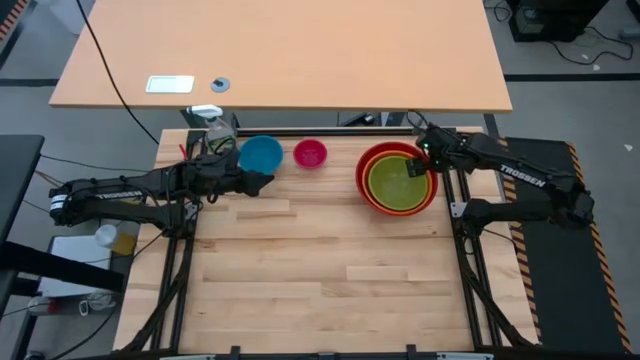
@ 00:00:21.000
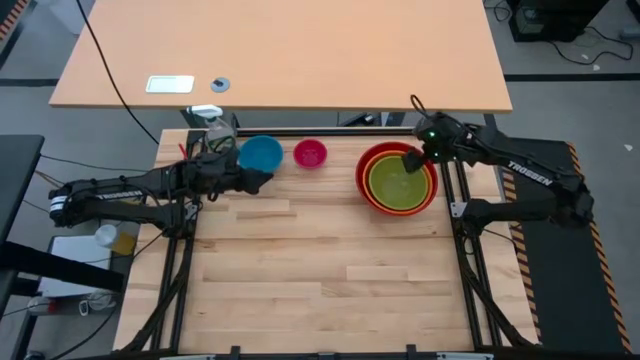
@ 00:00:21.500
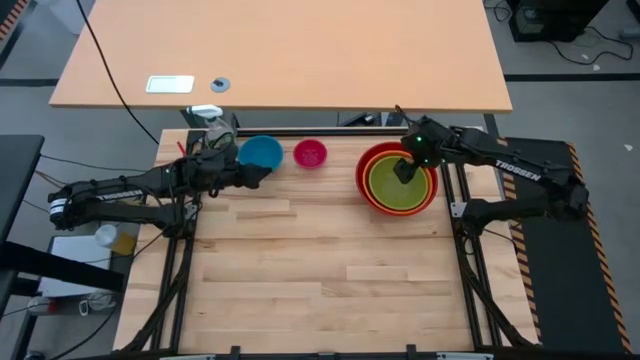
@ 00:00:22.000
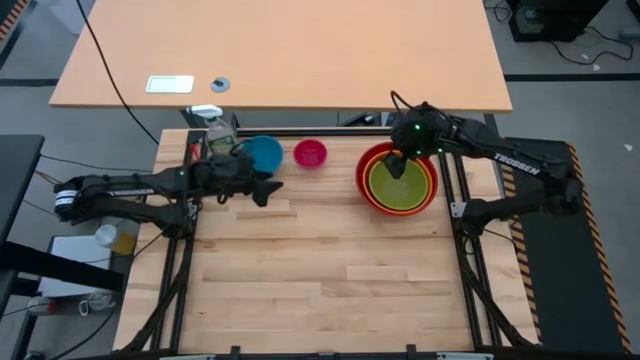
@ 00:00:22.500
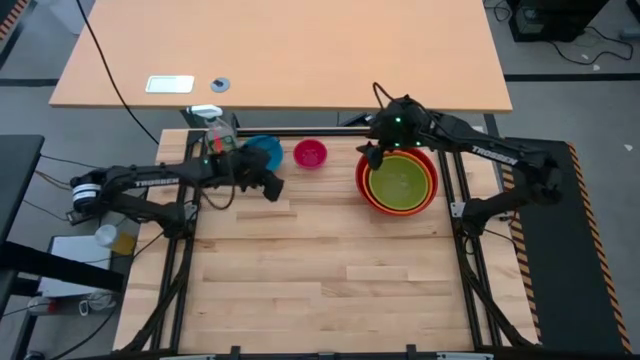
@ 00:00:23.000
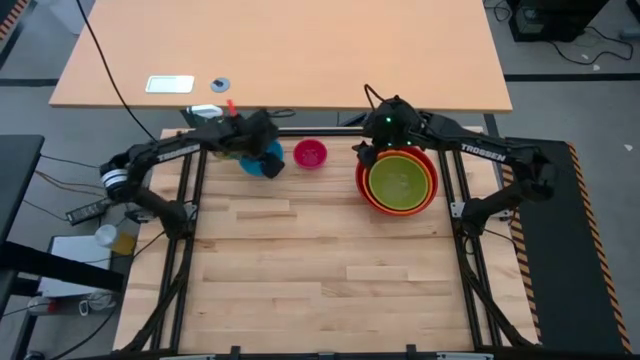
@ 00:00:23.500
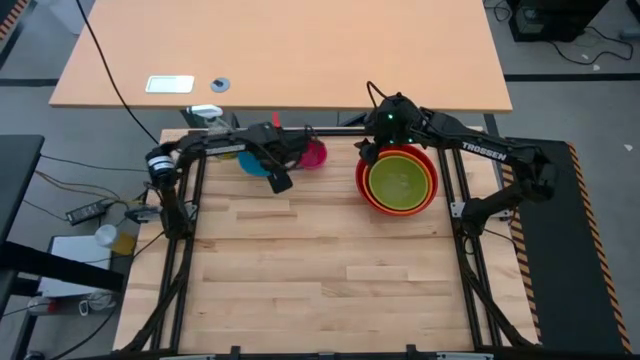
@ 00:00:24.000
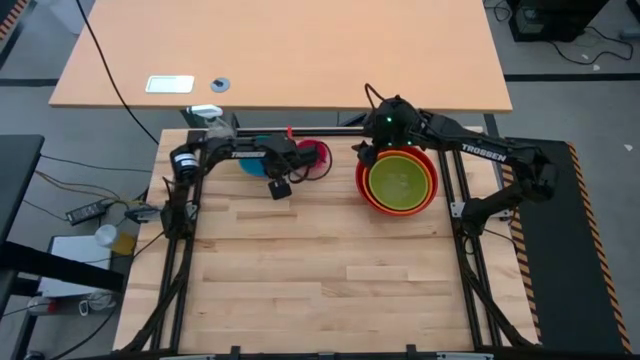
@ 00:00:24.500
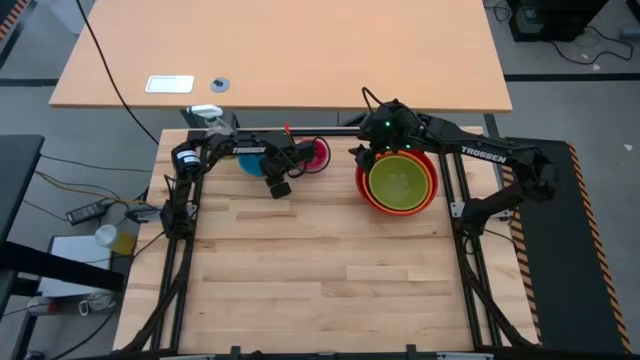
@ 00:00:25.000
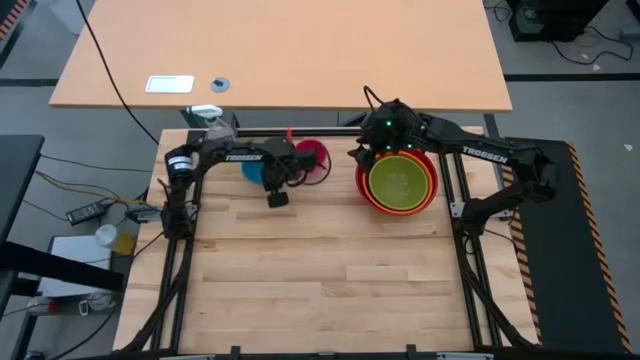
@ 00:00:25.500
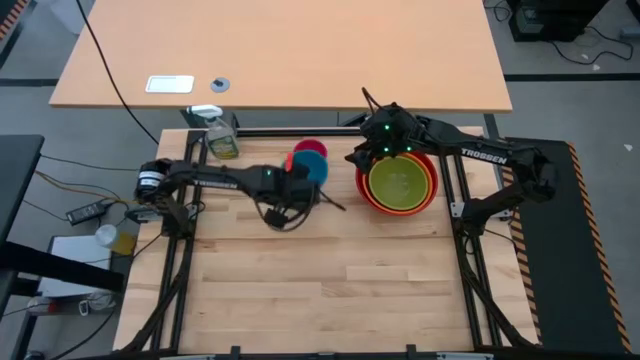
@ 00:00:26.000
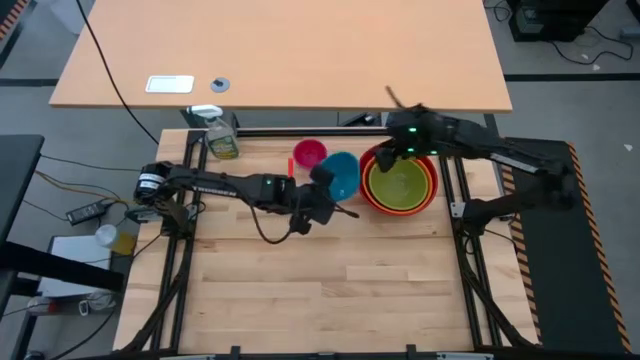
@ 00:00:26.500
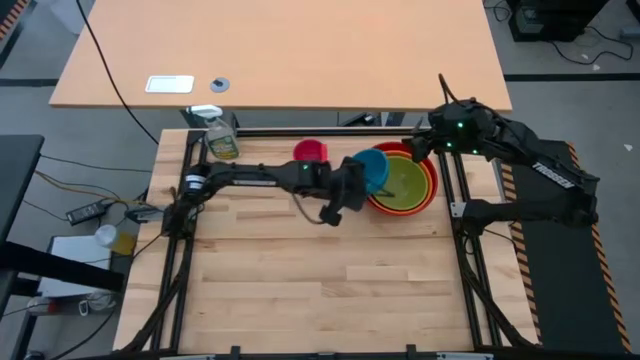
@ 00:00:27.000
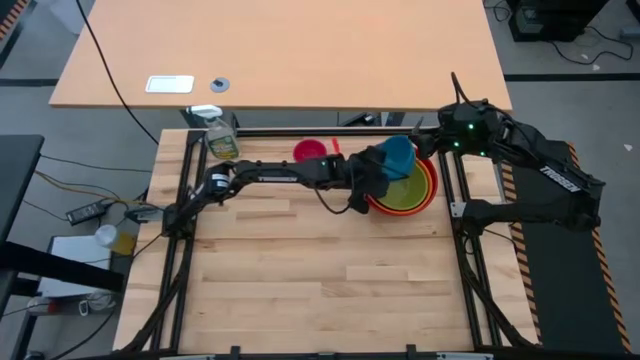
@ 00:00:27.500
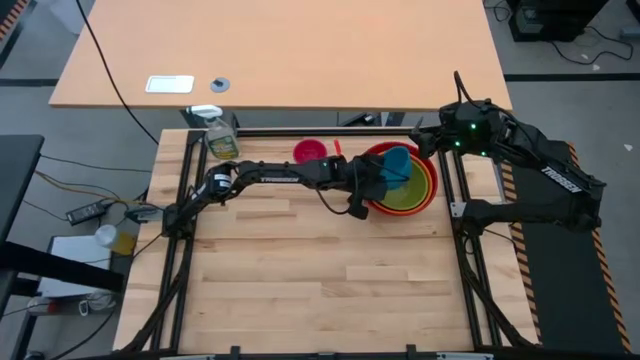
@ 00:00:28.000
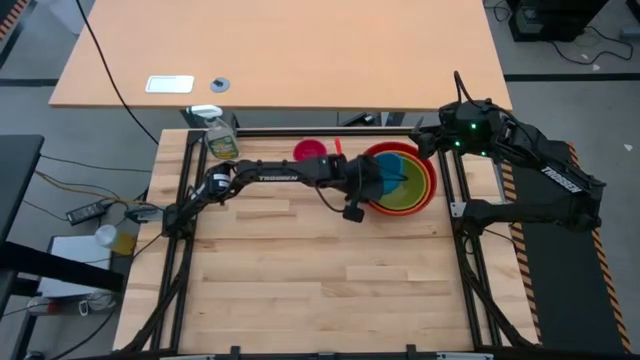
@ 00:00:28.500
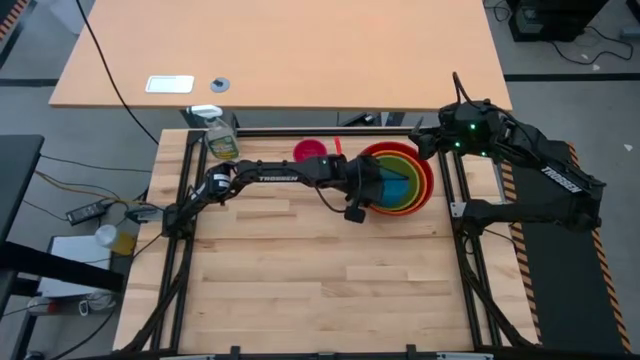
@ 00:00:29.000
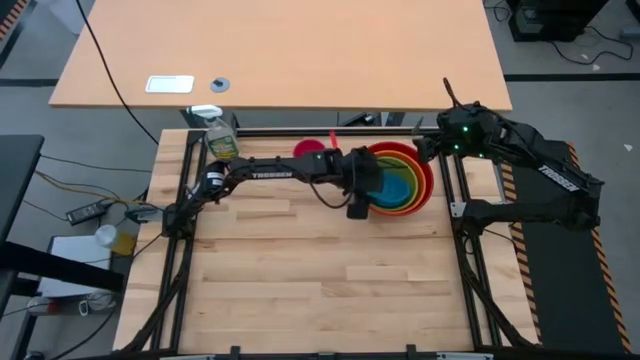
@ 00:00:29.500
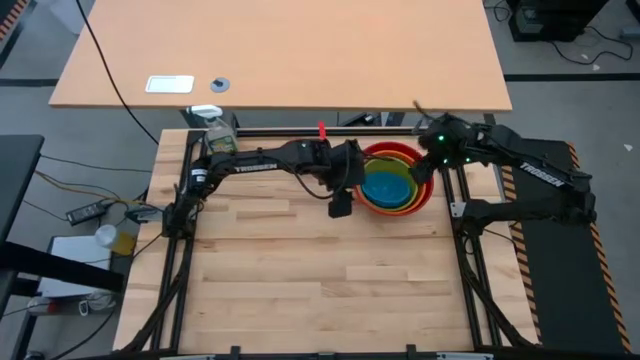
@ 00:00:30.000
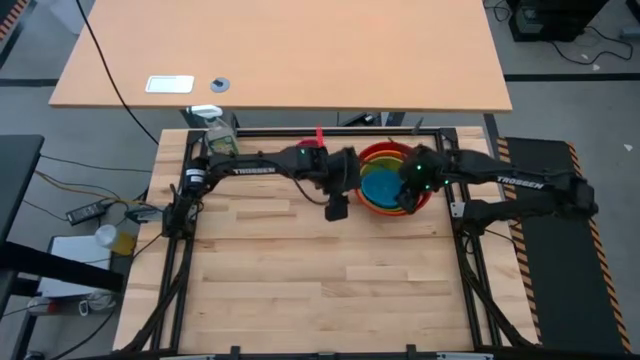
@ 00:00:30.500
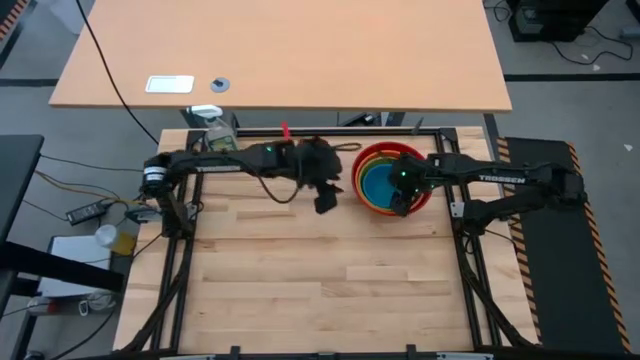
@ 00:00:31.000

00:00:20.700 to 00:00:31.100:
Stack the blue bowl on top of the green bowl

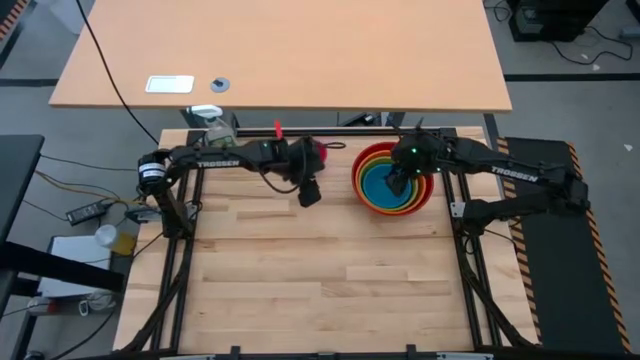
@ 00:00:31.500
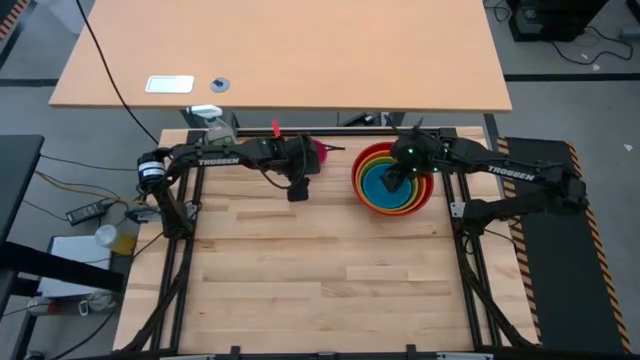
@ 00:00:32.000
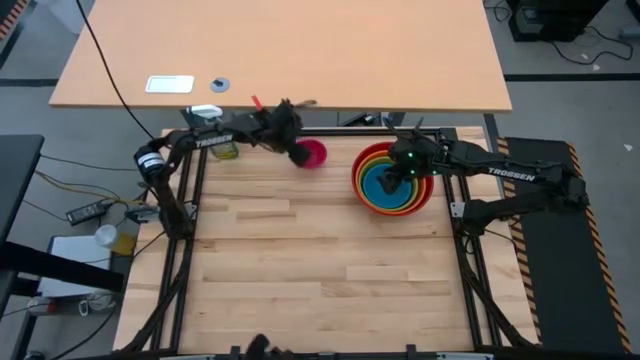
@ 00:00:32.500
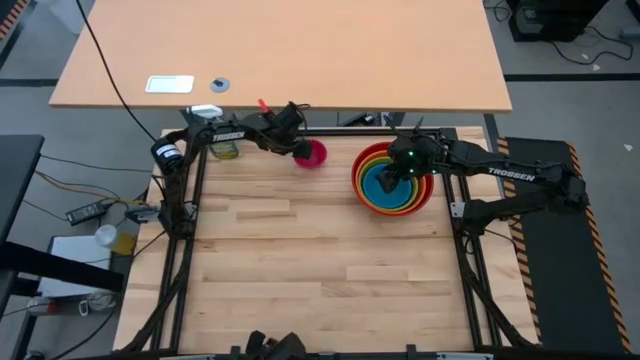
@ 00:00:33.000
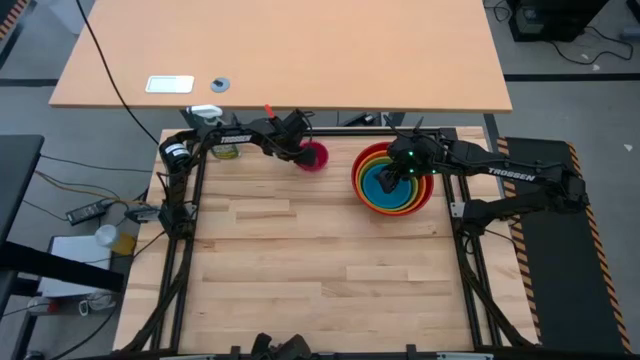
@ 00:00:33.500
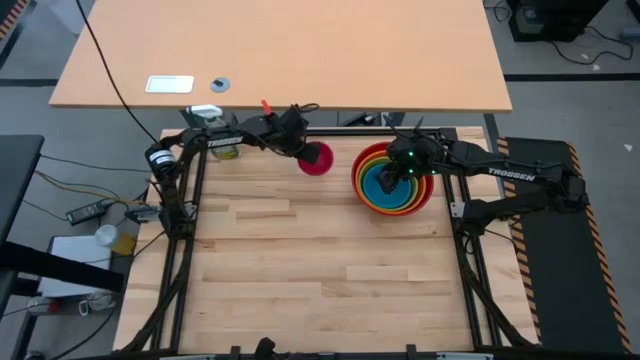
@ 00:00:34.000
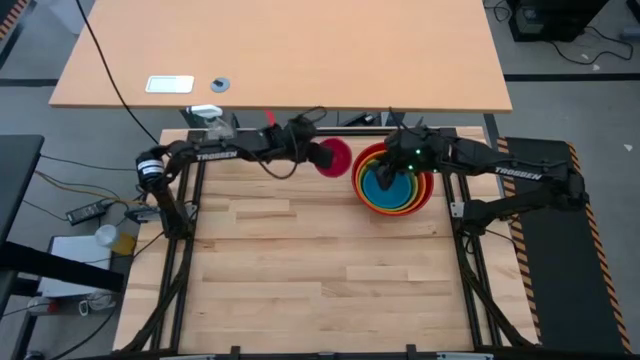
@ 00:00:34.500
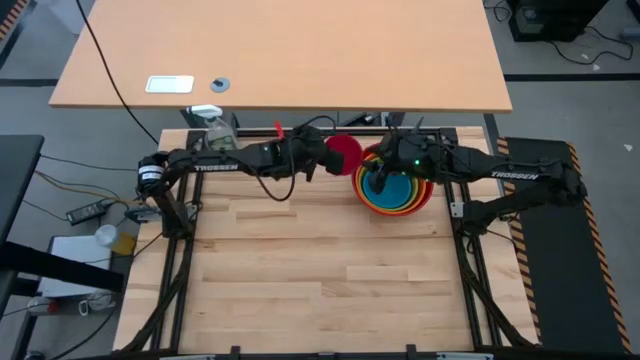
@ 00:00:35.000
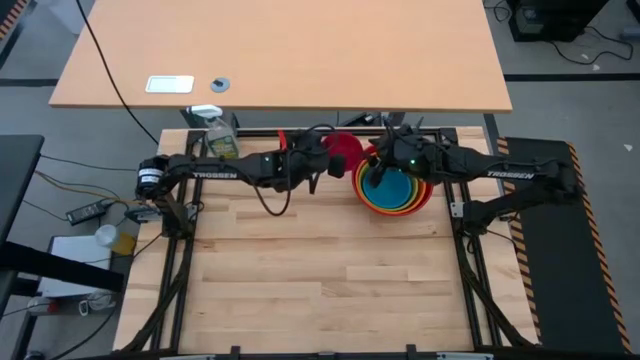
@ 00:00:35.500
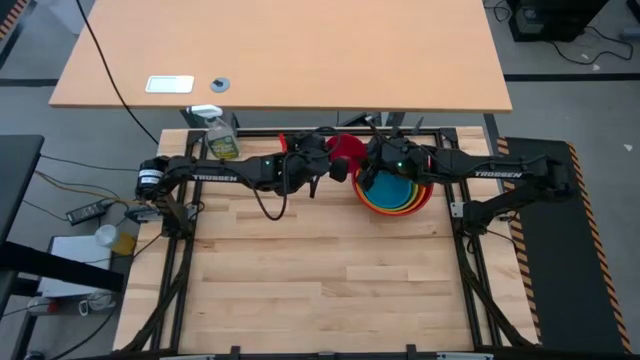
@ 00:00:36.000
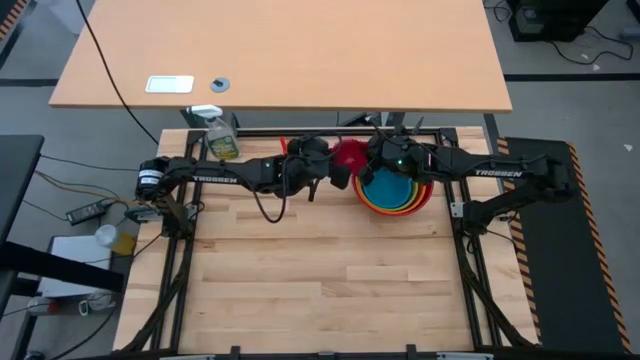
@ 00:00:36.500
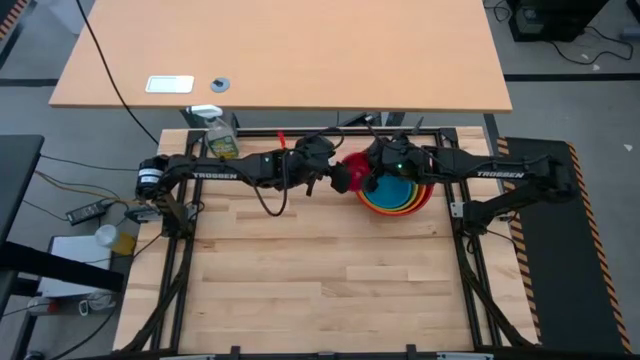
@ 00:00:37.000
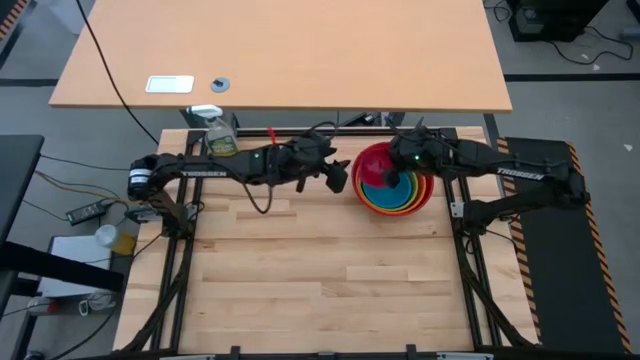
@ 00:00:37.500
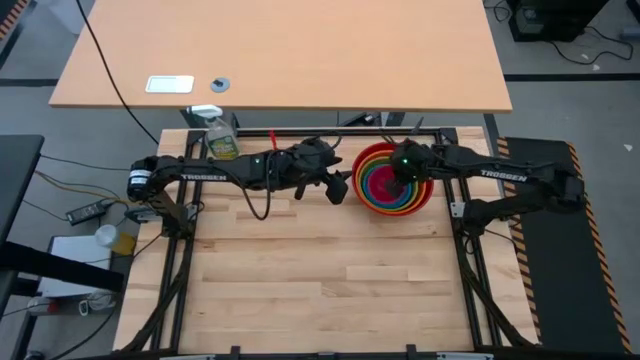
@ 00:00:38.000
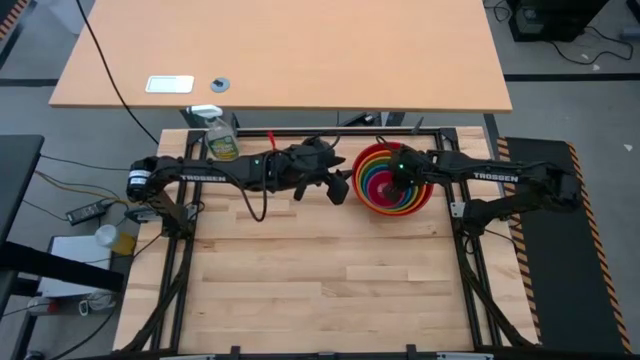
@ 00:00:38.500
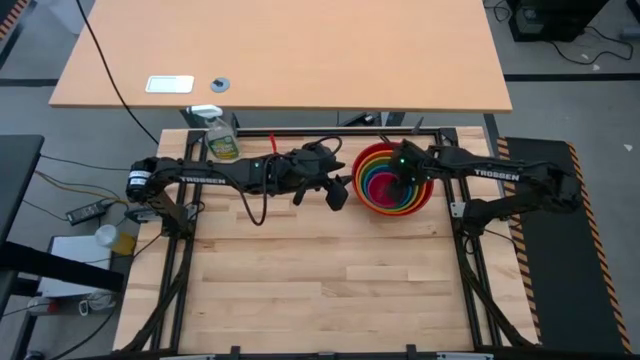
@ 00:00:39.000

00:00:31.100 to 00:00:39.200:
Stack the pink bowl on top of the blue bowl

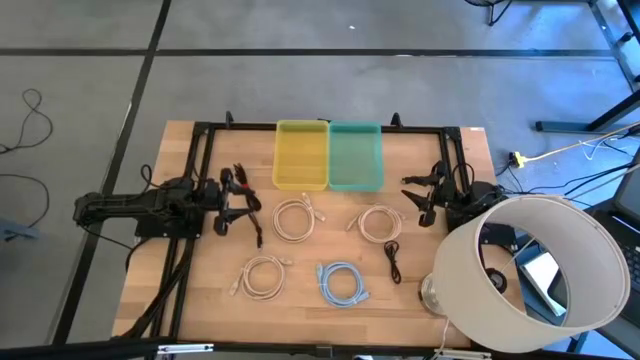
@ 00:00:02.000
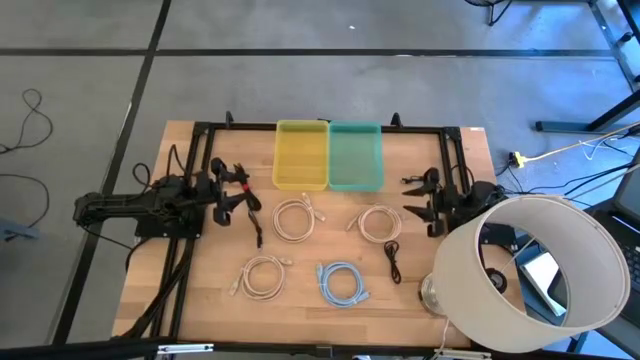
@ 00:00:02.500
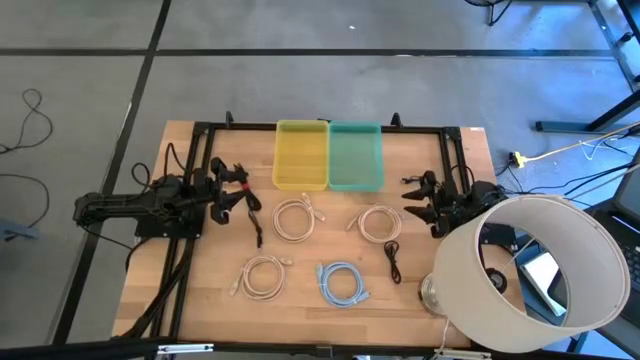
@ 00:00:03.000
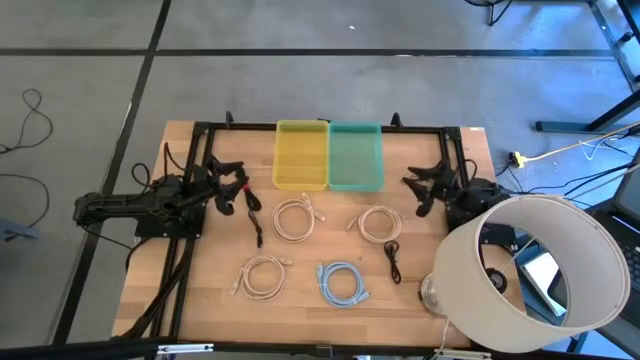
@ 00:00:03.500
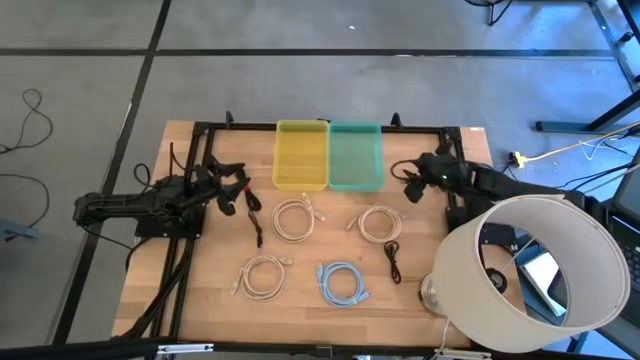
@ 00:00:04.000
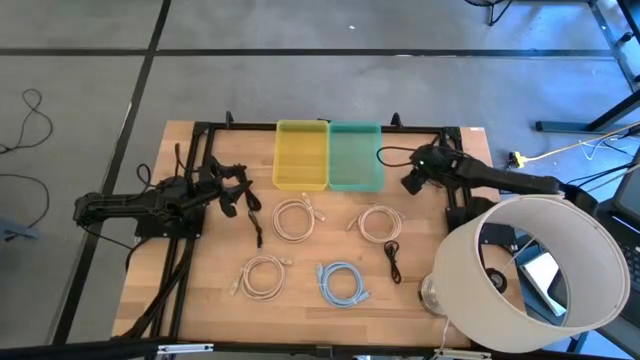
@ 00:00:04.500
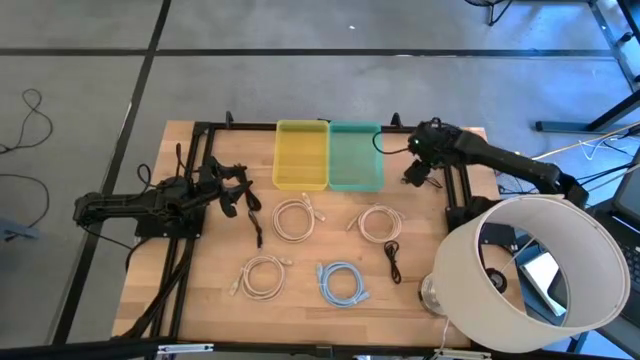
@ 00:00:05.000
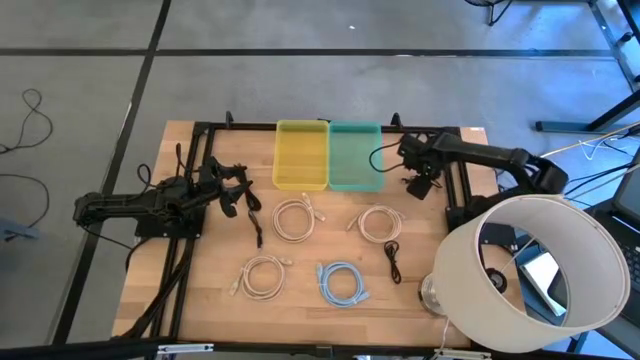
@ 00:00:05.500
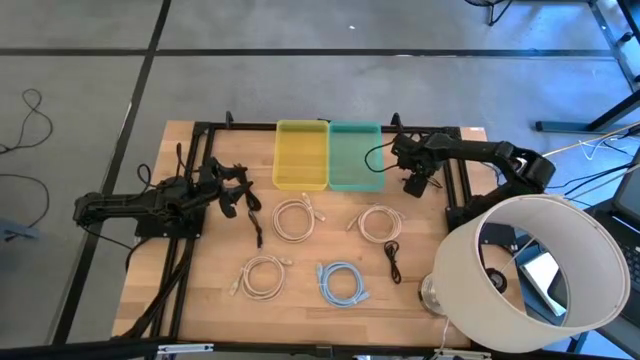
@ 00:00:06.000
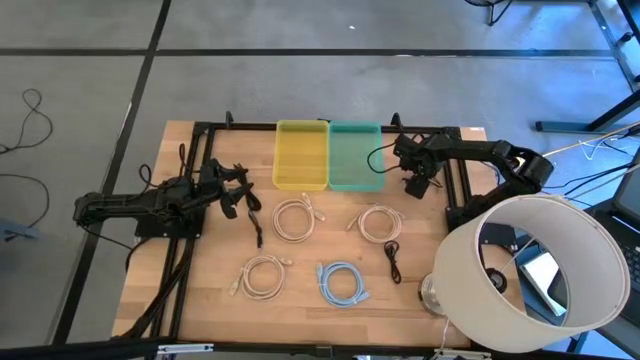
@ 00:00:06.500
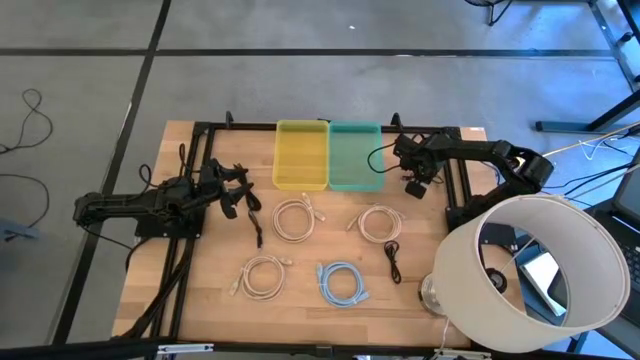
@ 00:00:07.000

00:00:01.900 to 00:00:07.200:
Put the black charger cable into the green bin
